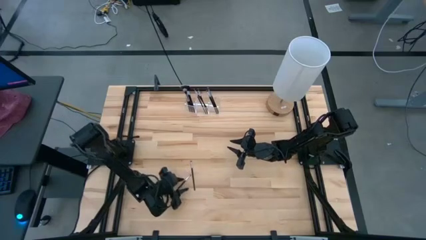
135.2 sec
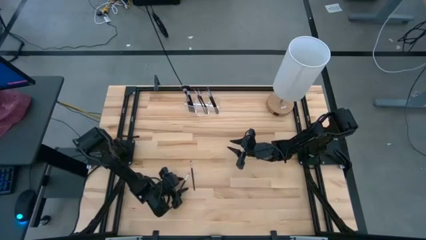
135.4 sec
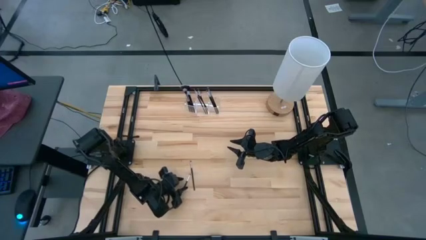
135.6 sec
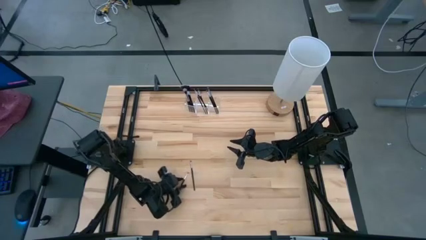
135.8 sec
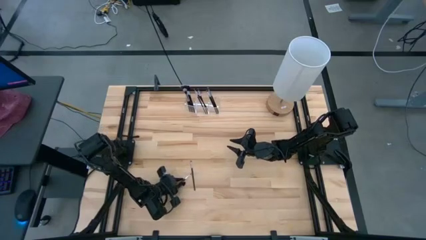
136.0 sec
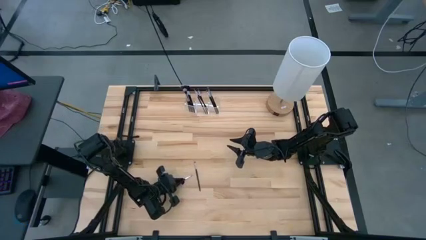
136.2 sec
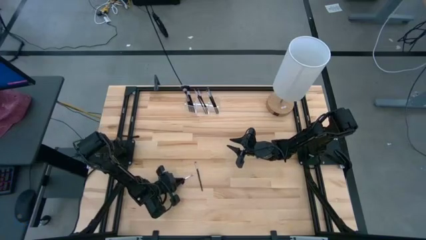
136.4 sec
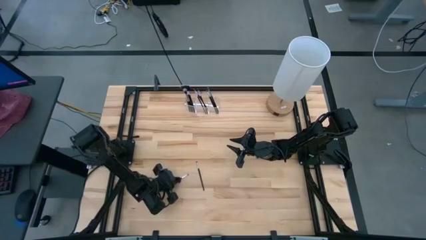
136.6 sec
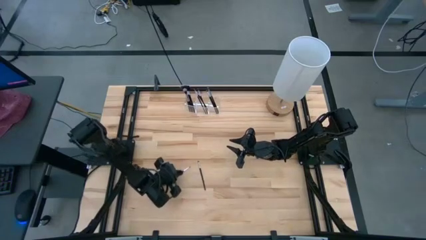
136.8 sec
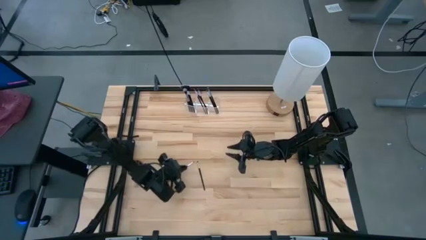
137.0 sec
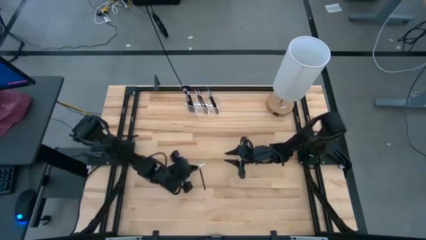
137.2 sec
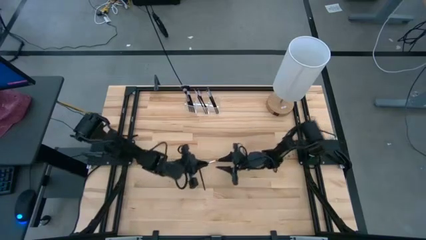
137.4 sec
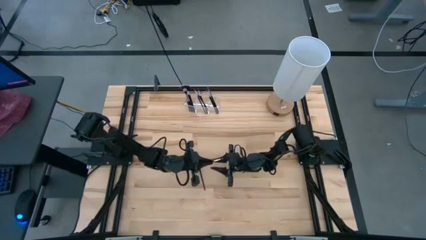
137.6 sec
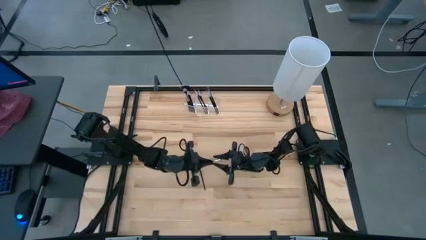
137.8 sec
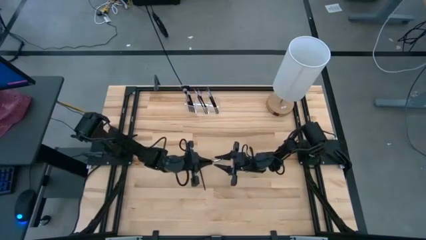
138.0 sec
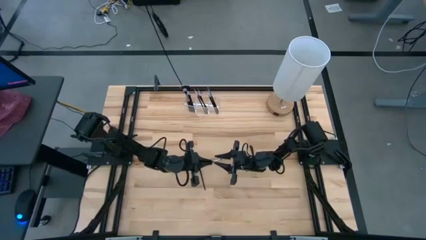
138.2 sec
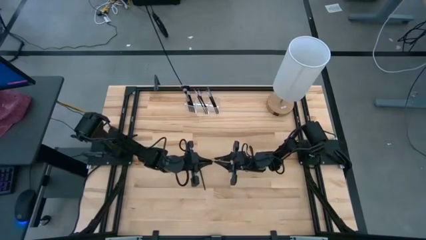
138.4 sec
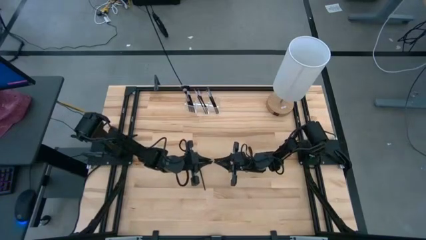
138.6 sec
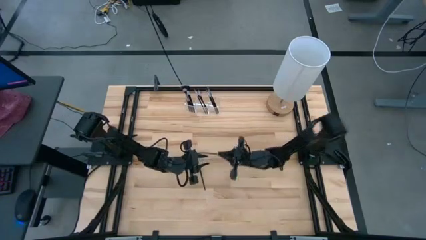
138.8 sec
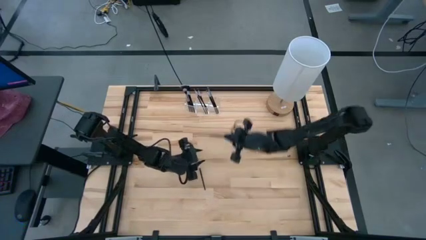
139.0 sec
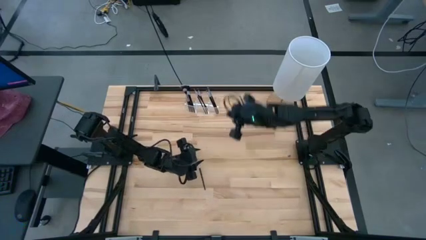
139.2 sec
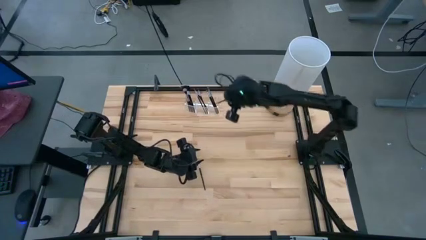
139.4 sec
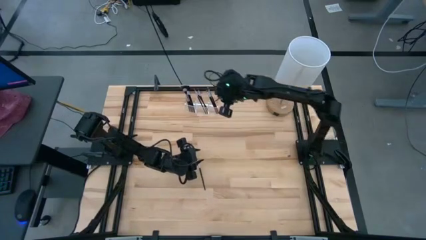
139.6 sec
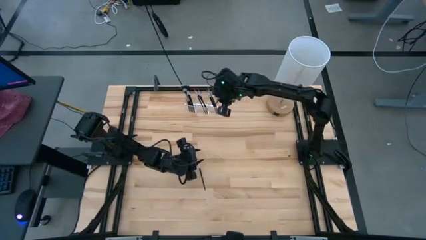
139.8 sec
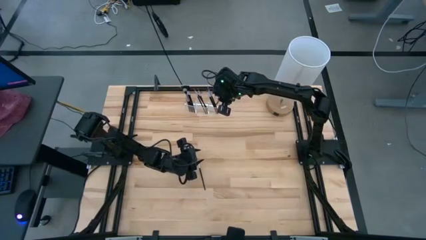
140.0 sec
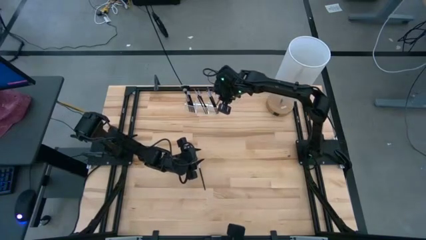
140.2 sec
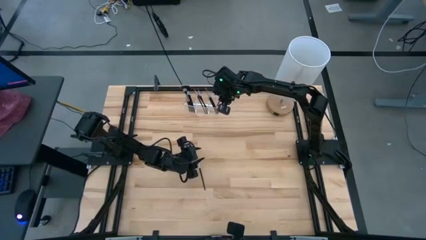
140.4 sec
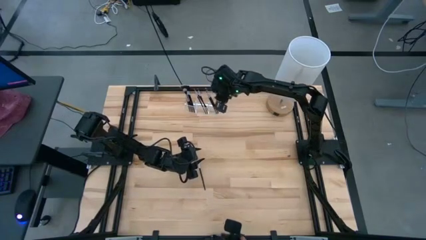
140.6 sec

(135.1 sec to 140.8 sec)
Task: Put items in baskets/containers
Put the black eyeshadow brush into the transparent organizer

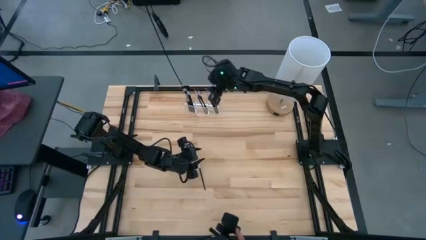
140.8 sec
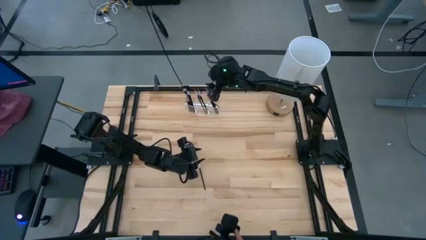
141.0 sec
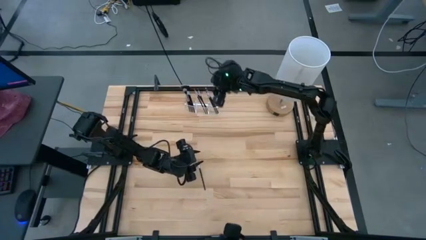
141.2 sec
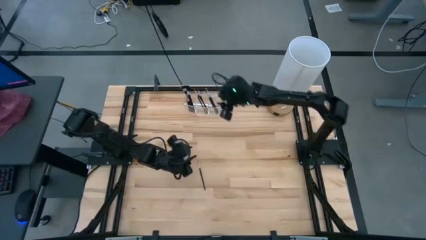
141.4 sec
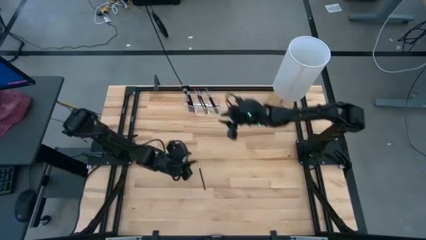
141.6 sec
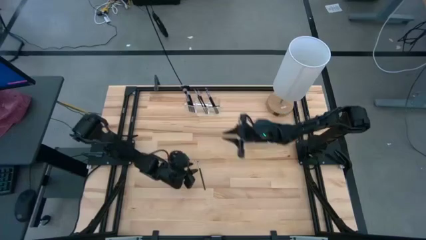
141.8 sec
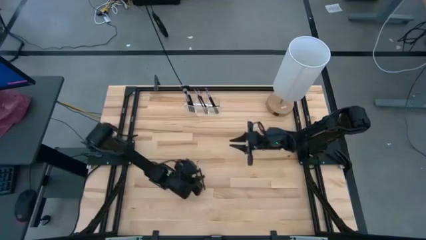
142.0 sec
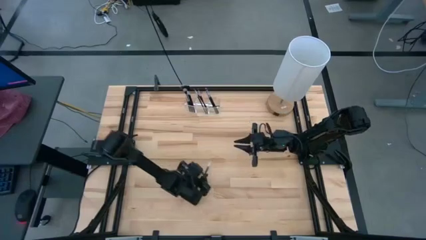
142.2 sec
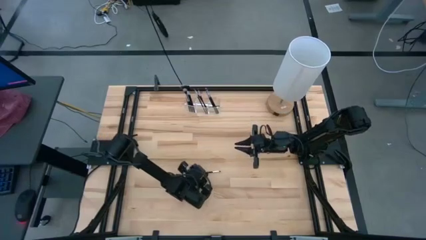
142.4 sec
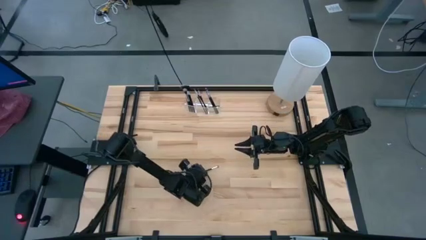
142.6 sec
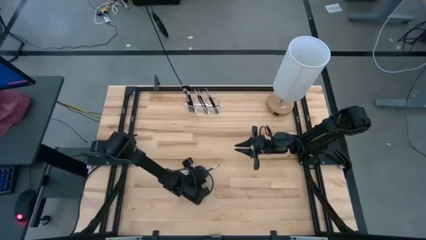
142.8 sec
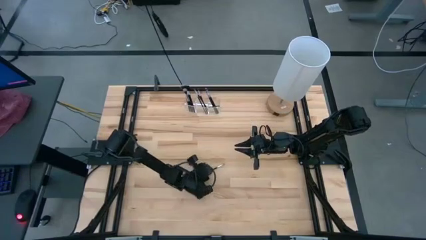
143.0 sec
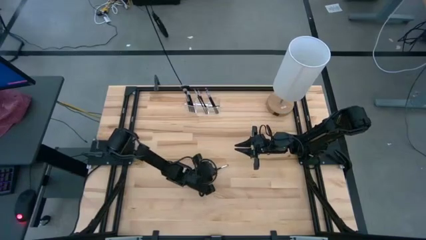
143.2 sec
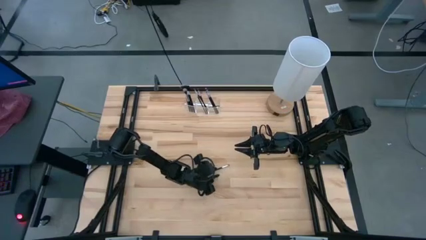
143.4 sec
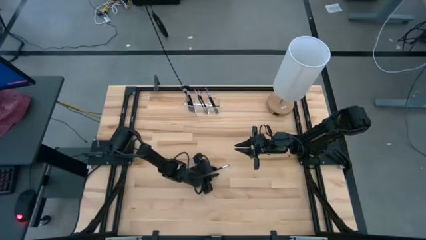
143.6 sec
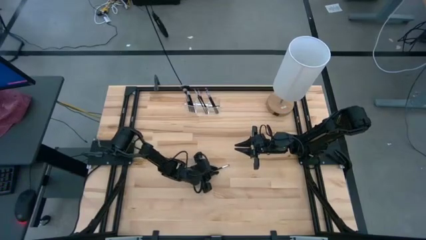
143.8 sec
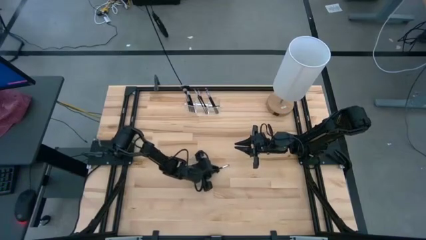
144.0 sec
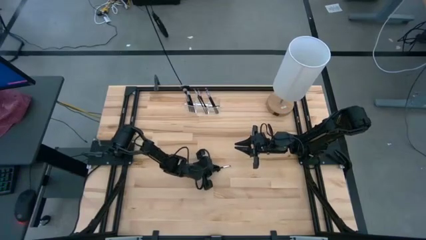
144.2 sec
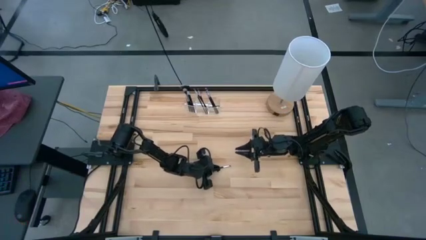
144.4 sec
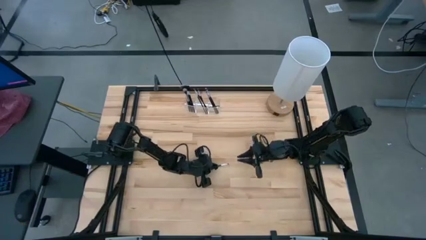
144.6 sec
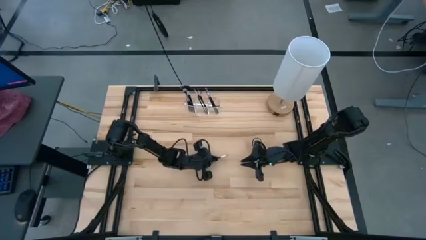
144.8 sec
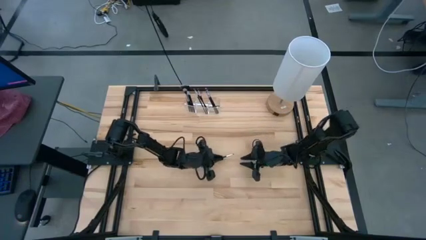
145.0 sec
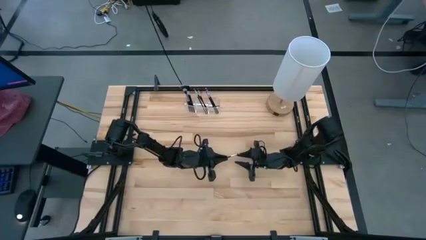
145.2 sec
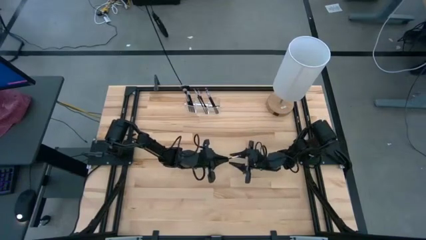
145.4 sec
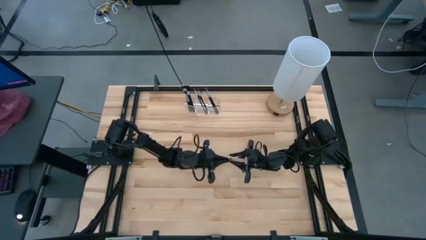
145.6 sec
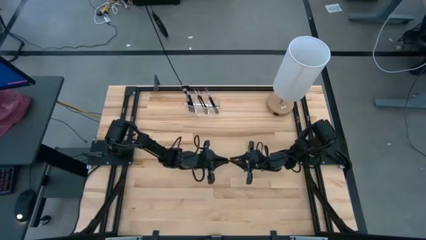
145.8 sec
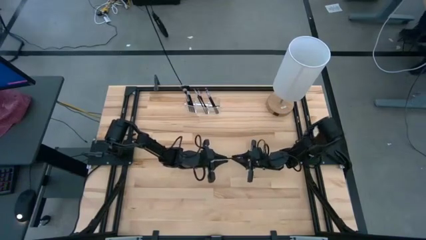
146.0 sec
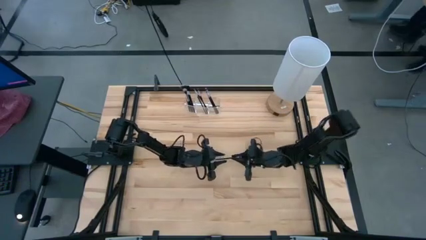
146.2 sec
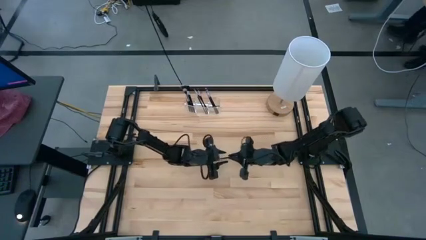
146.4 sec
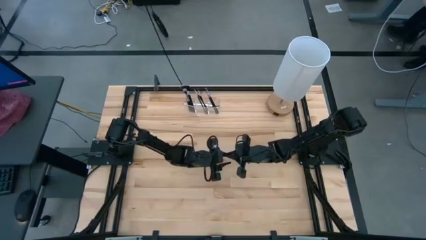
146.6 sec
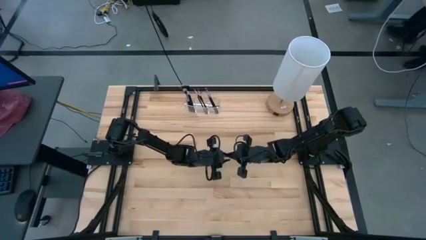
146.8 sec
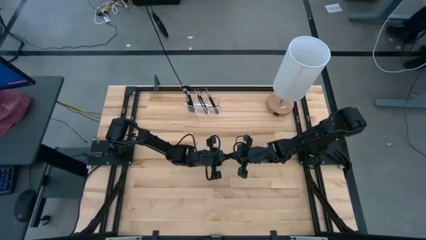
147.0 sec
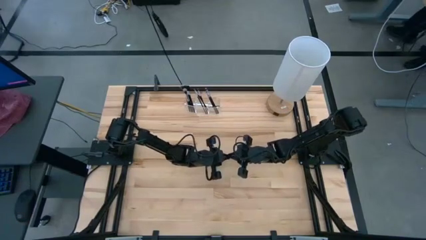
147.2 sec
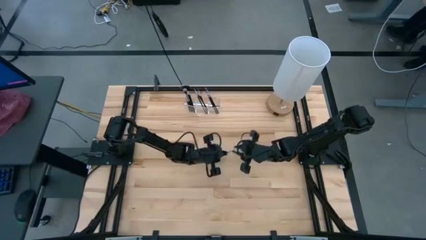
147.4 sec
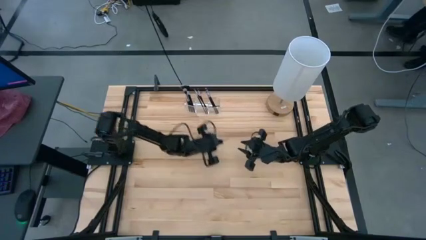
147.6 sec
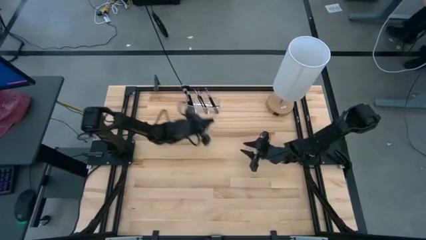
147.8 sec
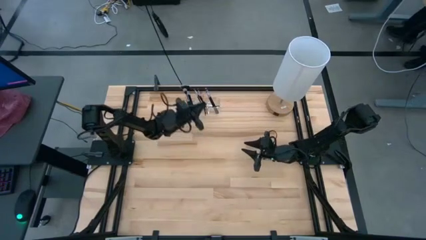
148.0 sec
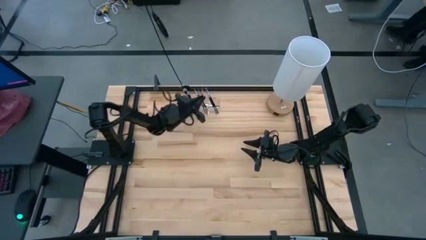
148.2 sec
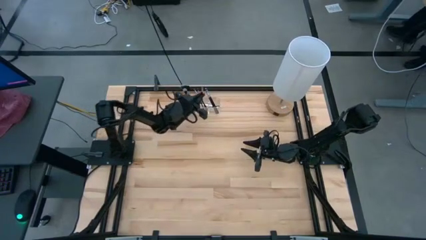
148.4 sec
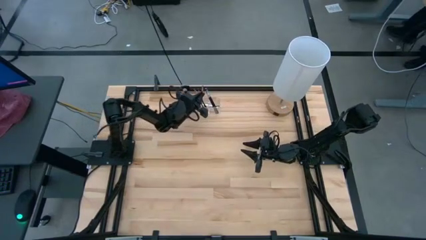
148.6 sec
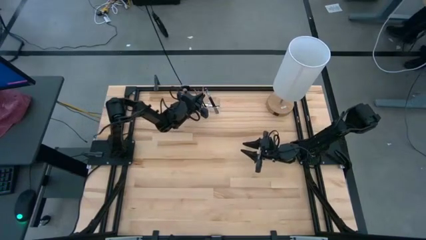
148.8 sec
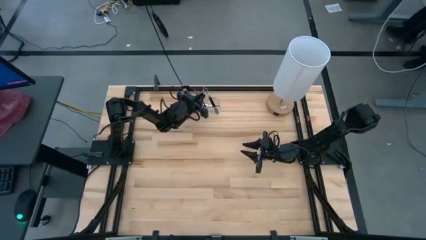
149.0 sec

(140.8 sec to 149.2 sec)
Put the black eyeshadow brush into the transparent organizer

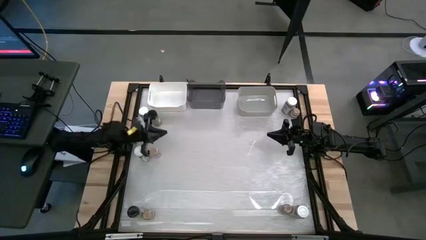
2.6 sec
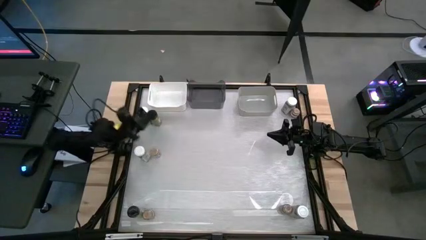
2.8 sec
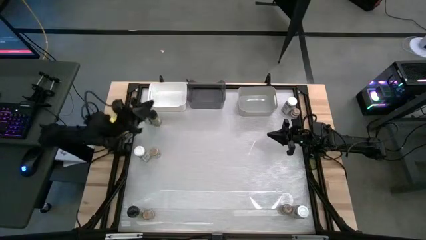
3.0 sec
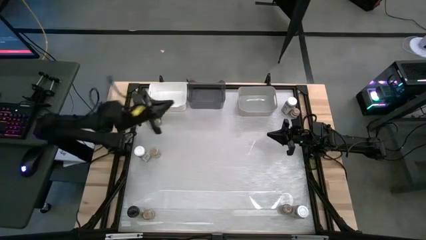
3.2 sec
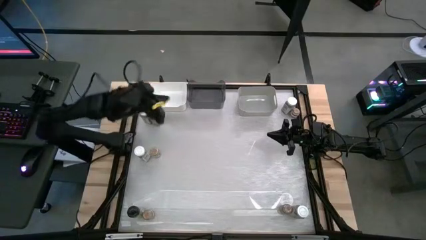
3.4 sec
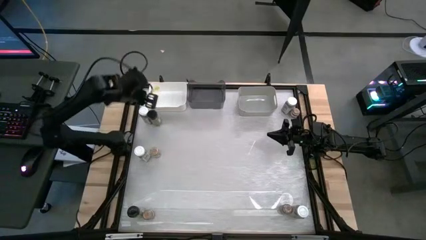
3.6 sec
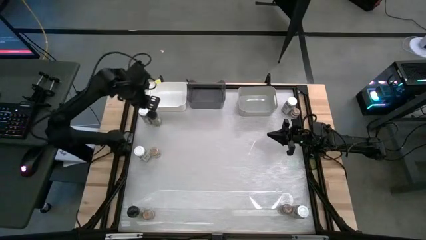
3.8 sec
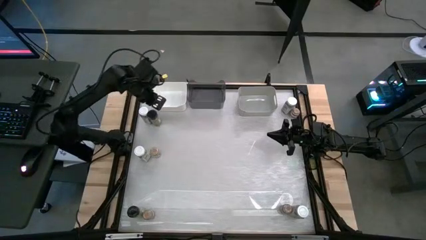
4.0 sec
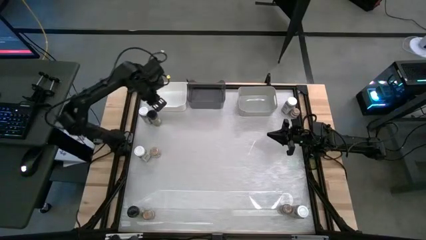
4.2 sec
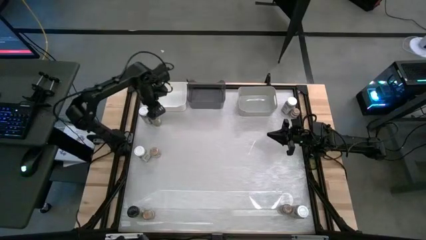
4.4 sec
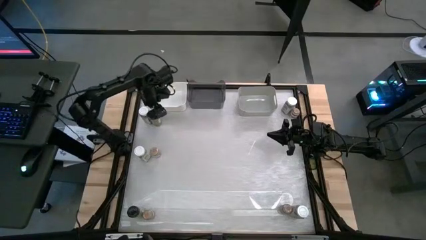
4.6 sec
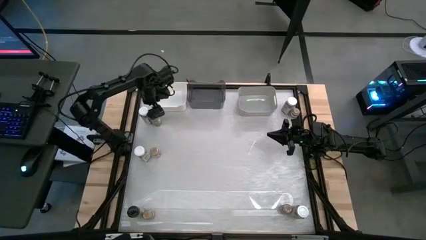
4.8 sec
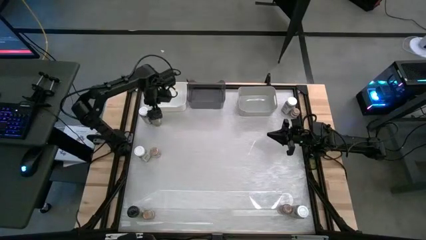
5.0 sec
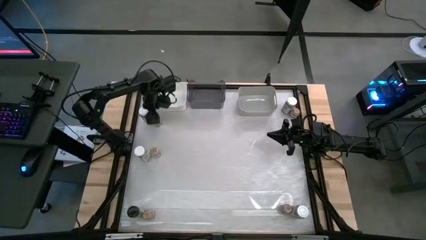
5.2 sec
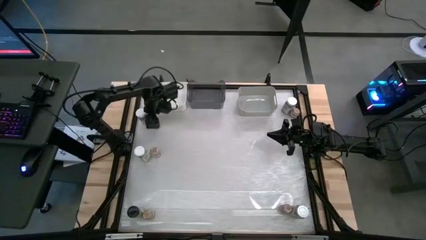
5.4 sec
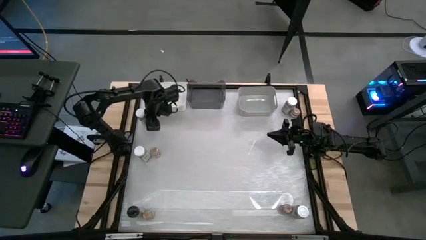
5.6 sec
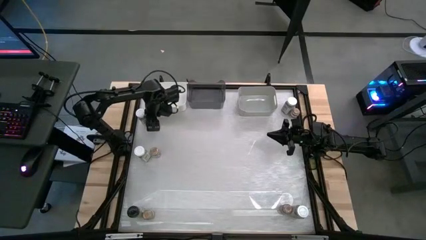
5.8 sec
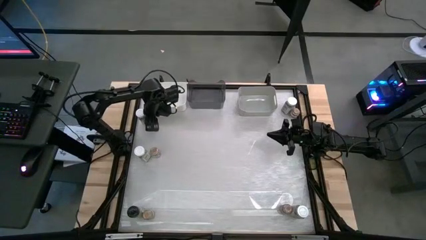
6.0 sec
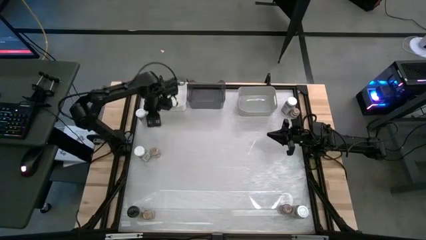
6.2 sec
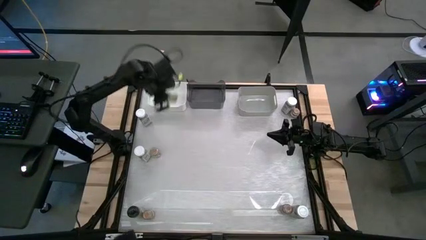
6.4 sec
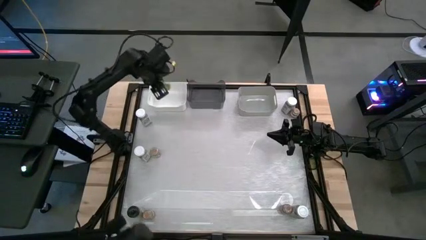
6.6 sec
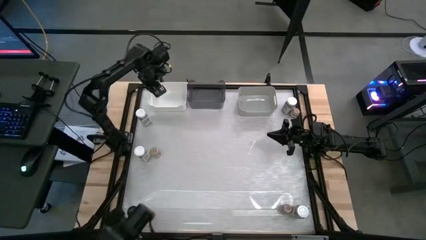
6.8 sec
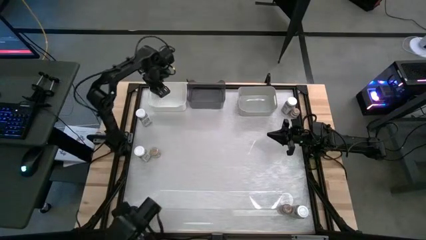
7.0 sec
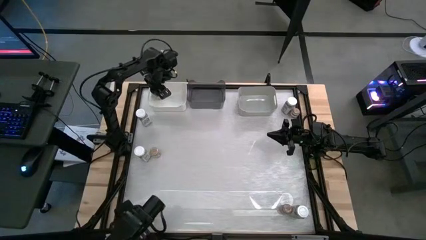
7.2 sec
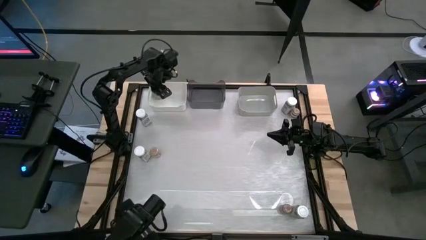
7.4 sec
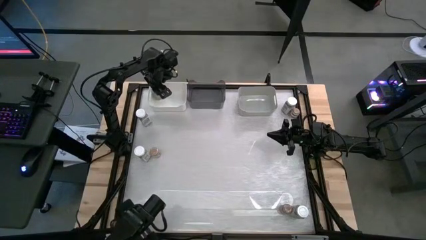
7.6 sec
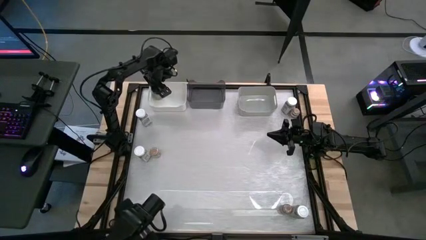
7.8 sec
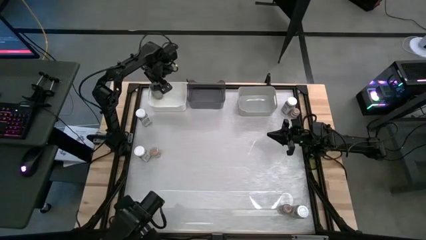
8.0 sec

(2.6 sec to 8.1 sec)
Task: Sort spices by type
Put the top black seasoning bottle into the white bin
